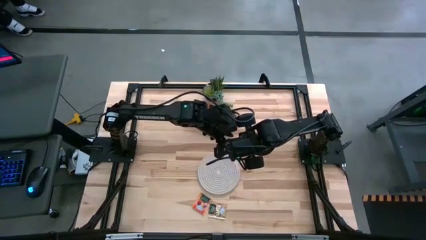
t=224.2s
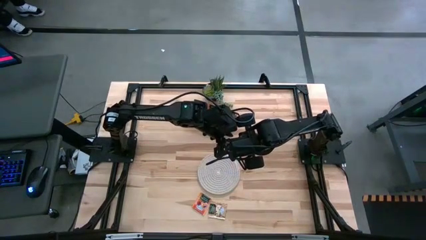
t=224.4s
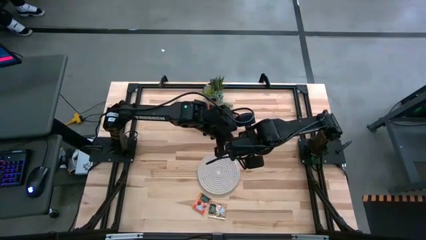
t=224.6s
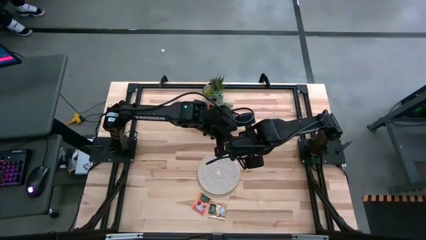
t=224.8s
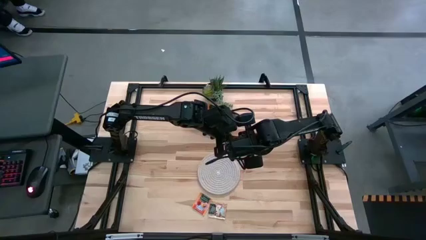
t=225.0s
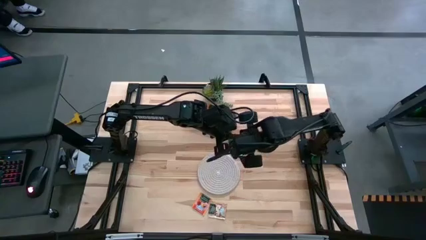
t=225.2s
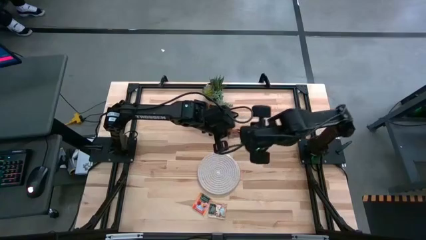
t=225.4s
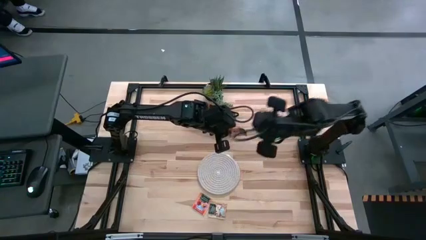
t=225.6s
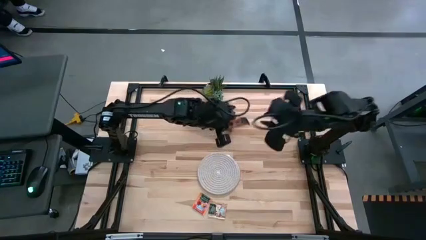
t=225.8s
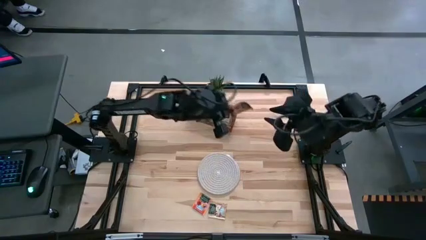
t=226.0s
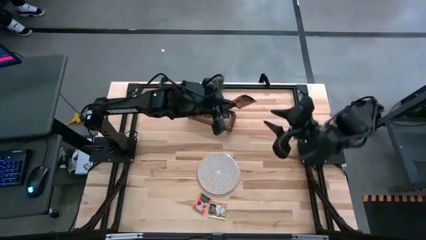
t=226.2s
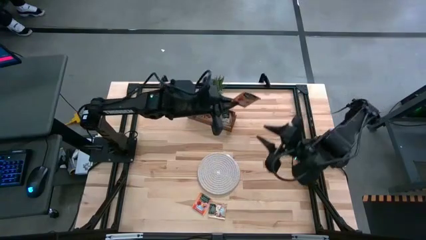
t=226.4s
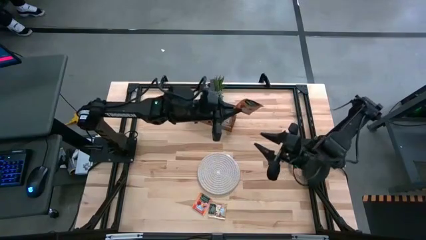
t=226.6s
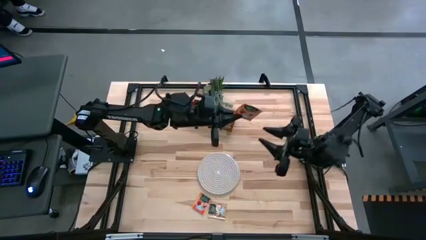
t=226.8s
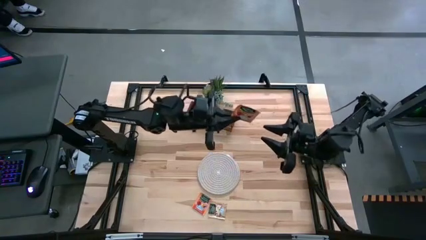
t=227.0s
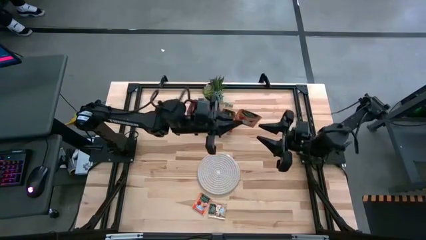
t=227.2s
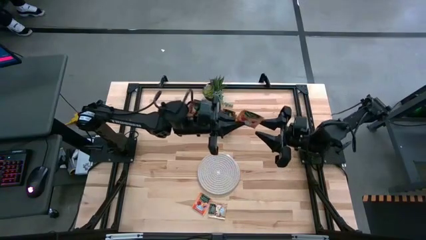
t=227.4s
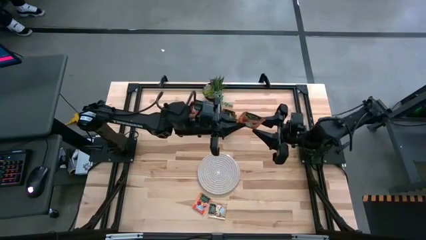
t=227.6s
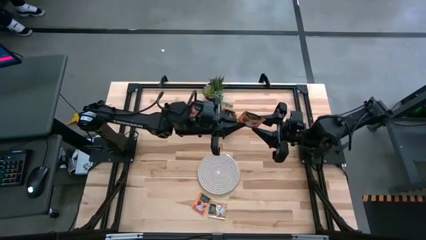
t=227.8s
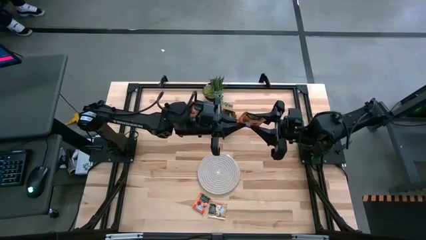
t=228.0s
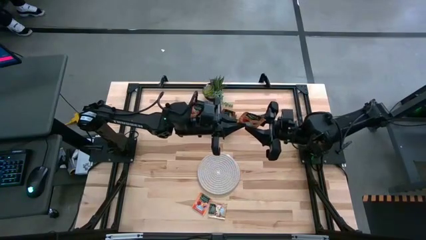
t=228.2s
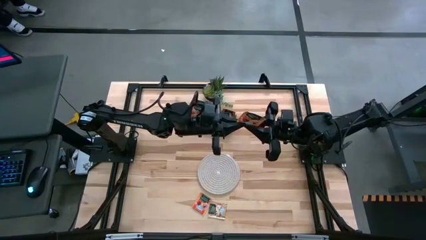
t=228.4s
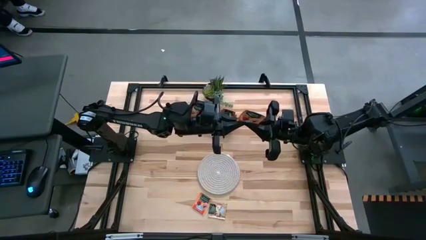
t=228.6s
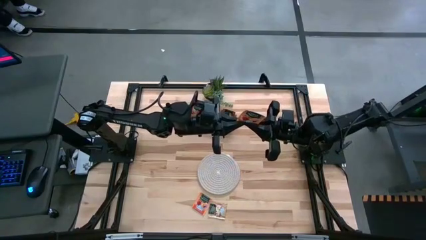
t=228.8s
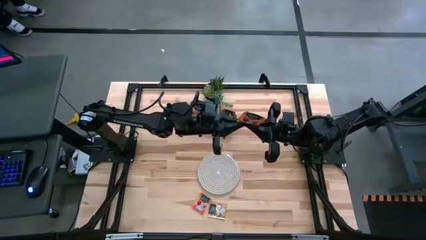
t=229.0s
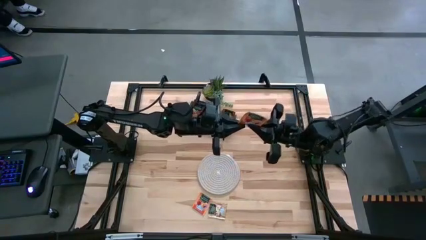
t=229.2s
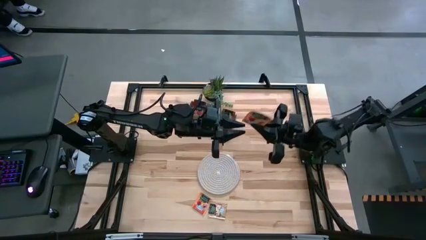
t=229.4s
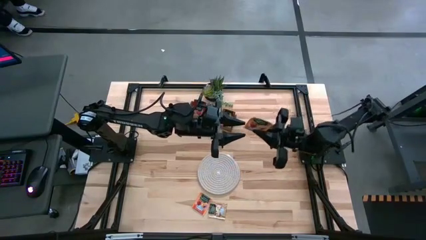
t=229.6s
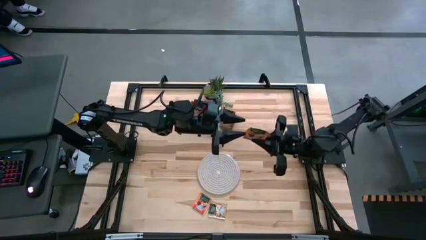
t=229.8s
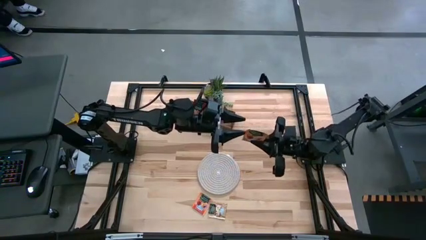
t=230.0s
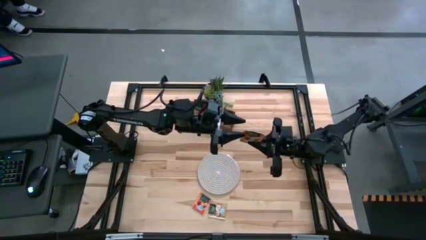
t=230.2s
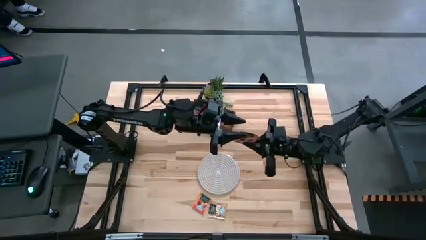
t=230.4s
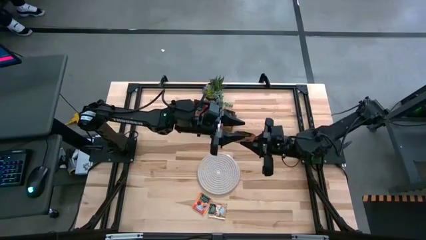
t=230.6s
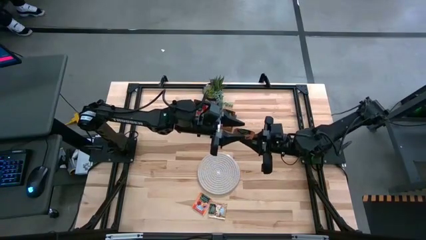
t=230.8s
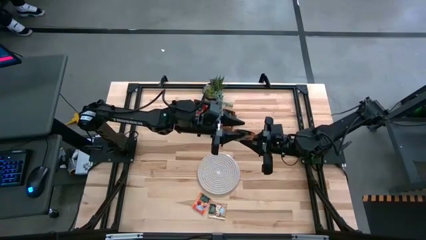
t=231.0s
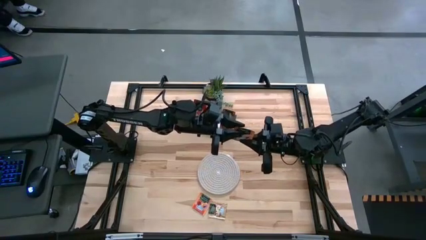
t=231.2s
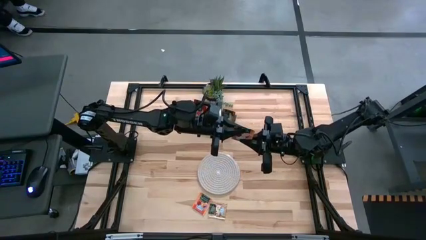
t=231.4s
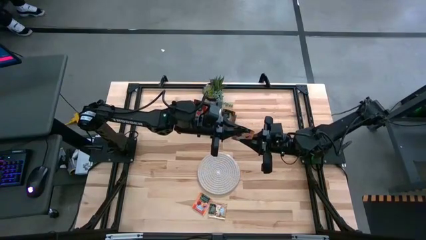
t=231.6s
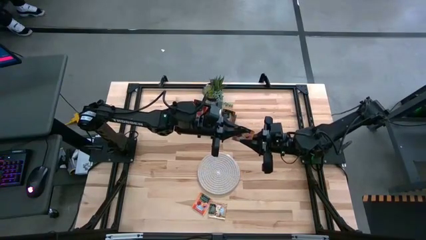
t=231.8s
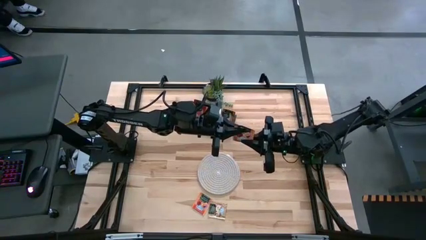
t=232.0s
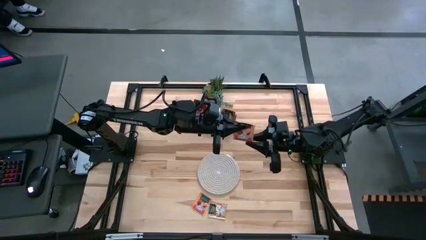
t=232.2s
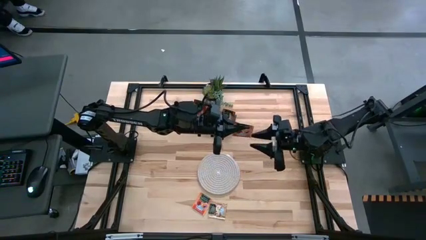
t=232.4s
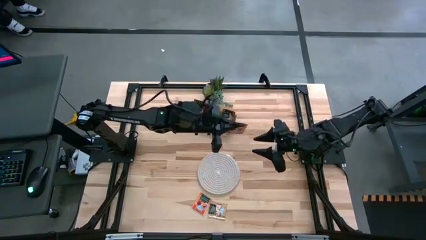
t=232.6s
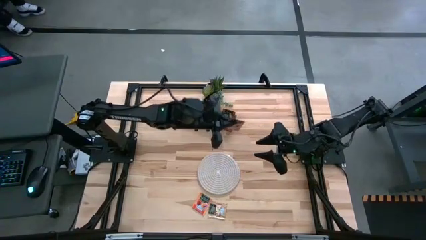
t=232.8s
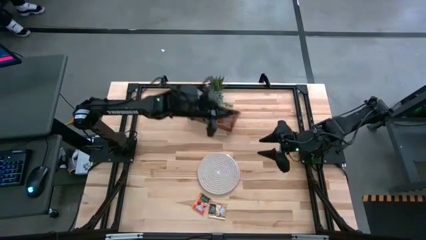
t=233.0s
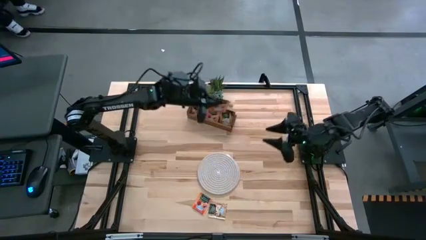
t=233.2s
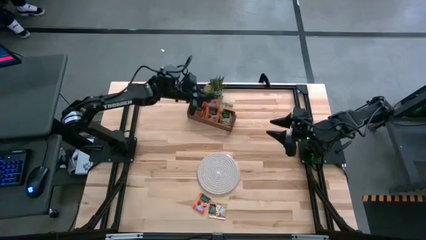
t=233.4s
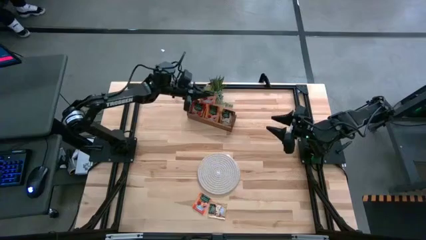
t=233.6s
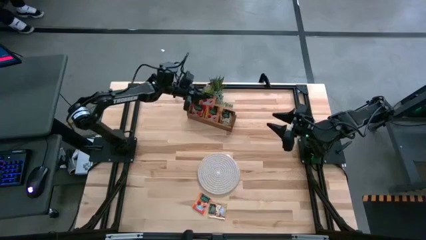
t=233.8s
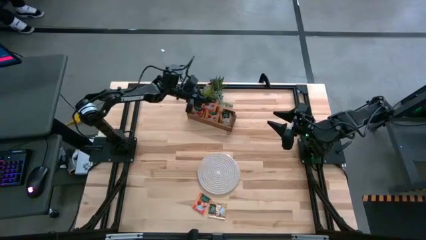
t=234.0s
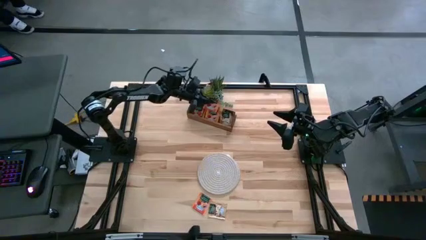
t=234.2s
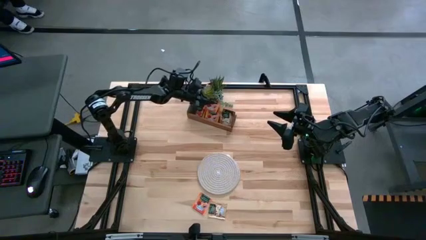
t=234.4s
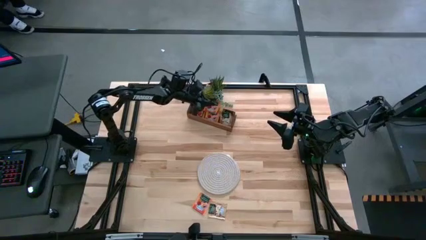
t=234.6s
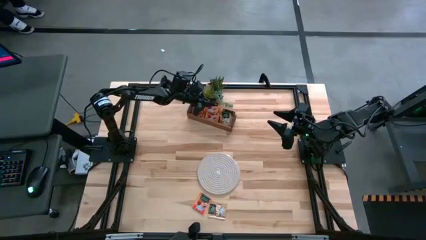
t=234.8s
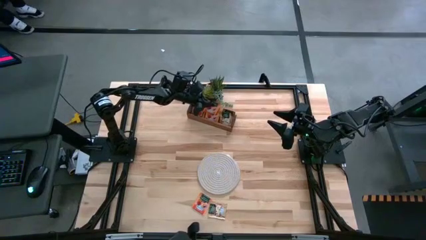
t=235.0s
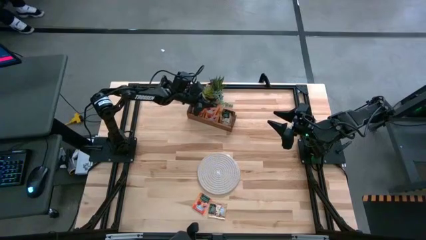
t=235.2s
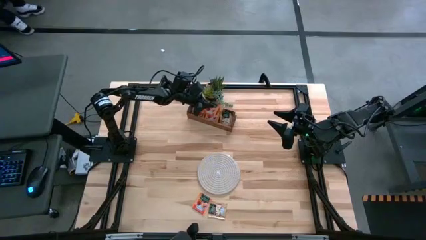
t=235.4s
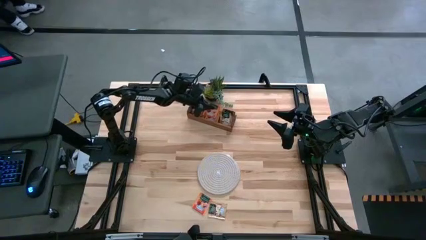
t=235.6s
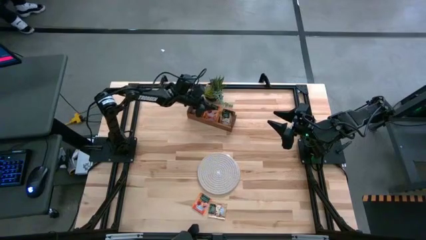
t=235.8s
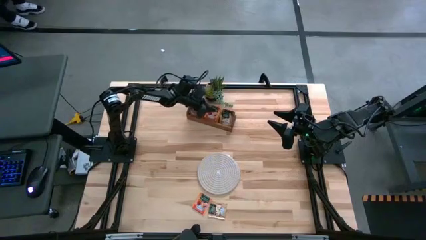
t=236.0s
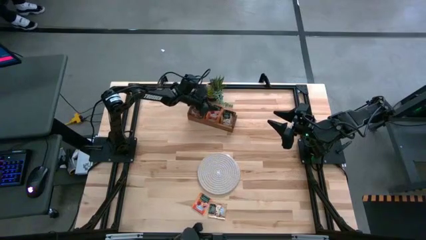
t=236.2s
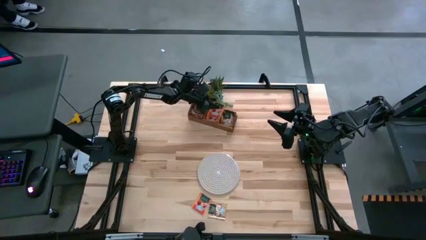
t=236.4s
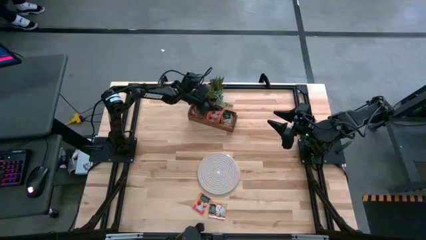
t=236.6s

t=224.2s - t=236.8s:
Task: Pick & Place Tea
Put the orange tea bag into the middle section of the wooden organizer

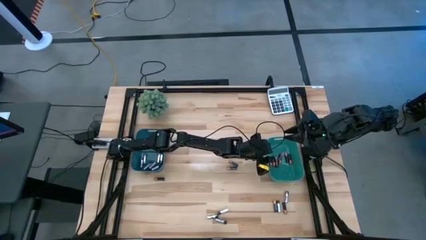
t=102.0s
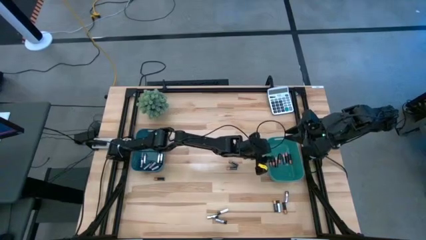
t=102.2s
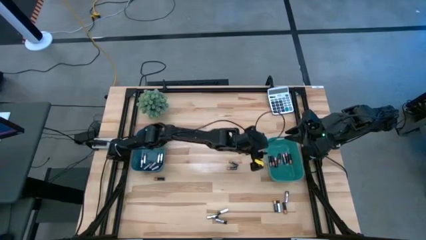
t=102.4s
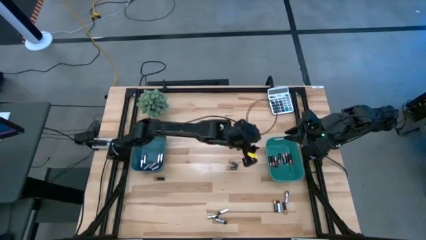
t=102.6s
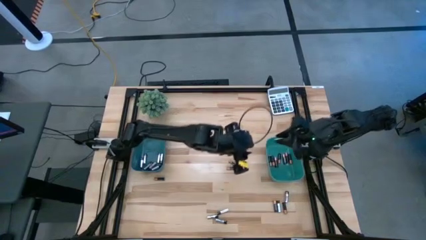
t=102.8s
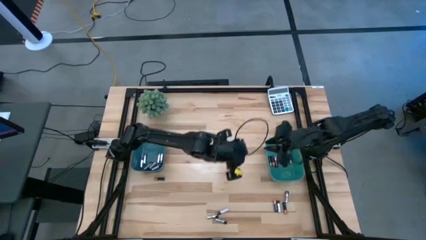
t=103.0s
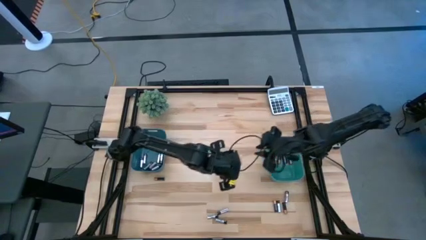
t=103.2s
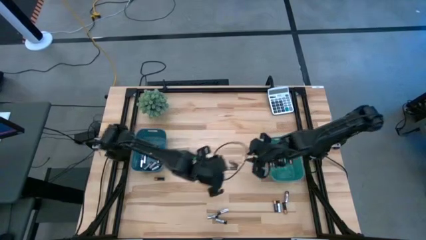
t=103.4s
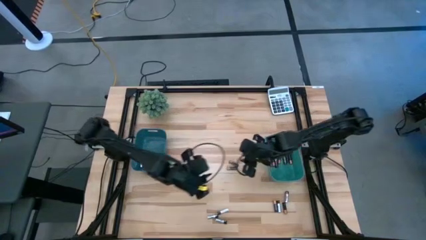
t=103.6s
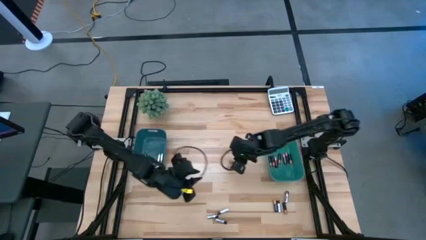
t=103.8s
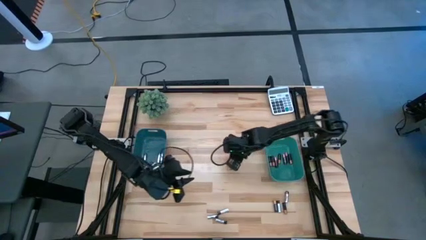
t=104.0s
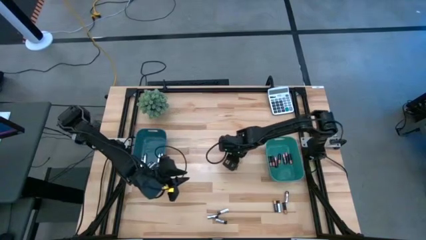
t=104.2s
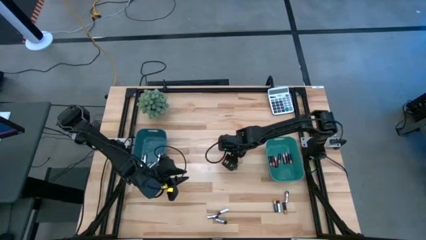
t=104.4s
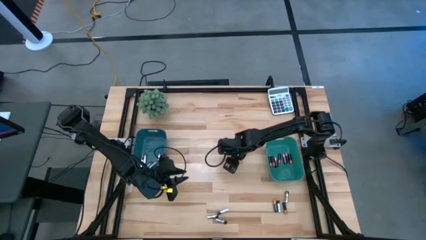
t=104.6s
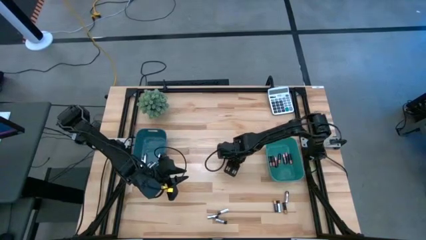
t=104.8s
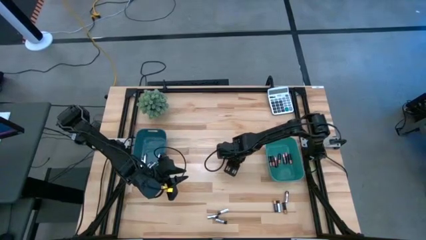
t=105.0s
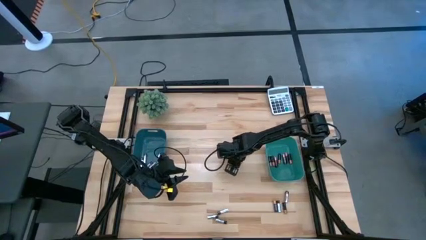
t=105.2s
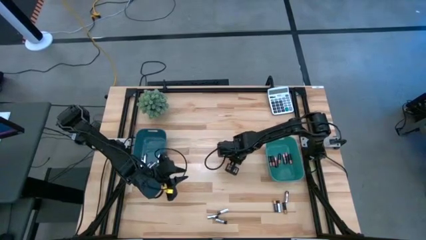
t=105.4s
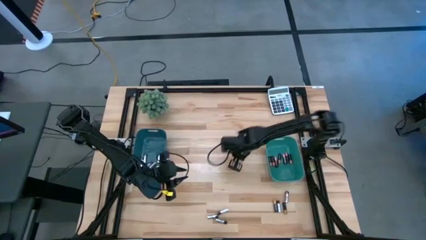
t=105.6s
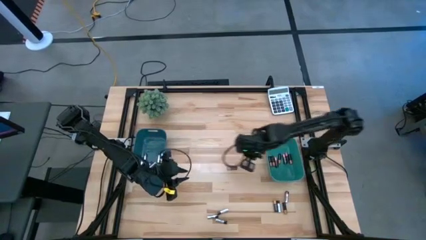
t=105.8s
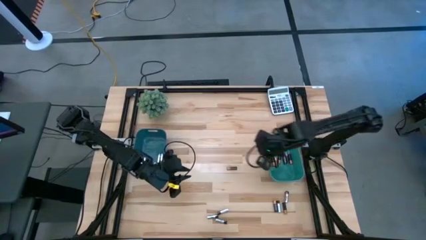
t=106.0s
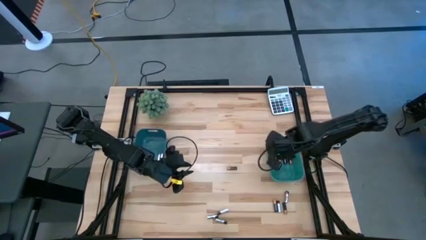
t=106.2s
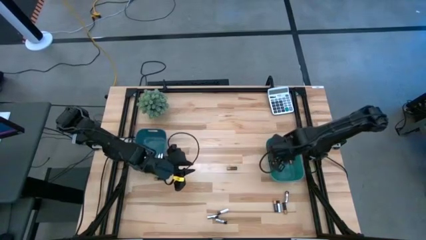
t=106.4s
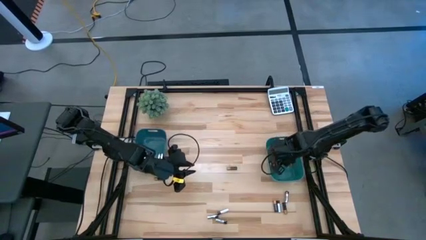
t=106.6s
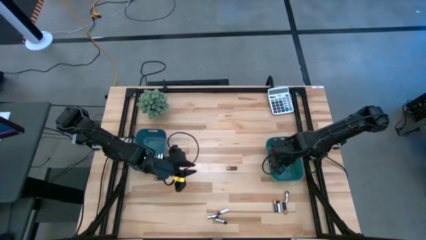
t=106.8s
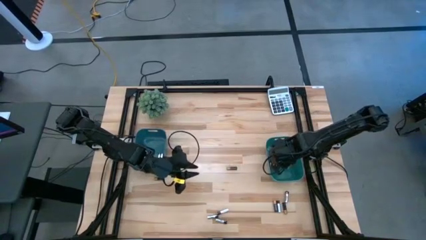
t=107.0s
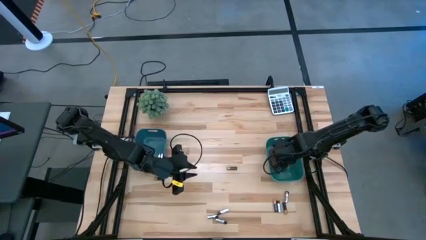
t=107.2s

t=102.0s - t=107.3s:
Task: Sort batteries
Put the black battery into the green bin
